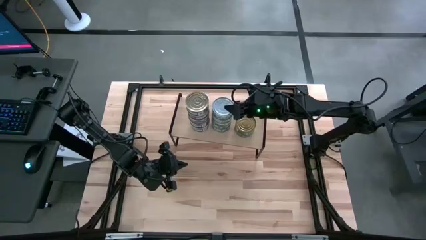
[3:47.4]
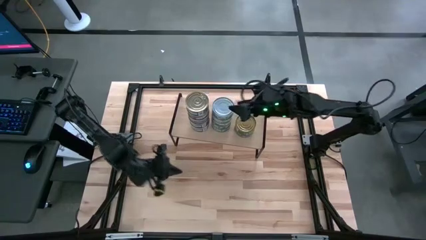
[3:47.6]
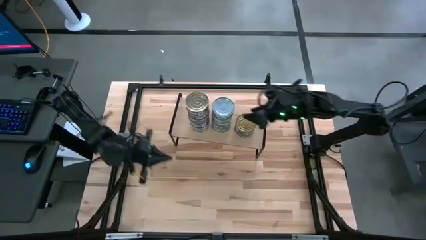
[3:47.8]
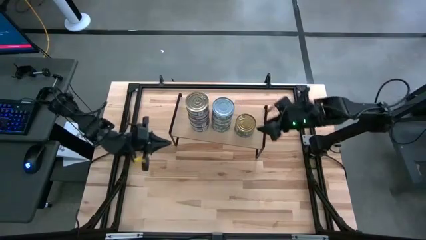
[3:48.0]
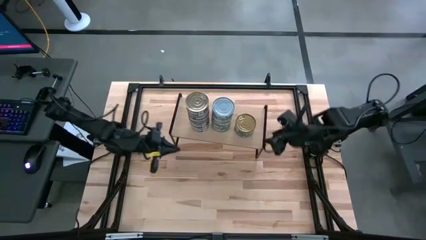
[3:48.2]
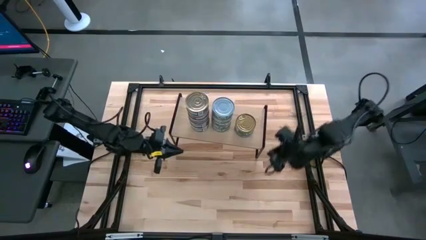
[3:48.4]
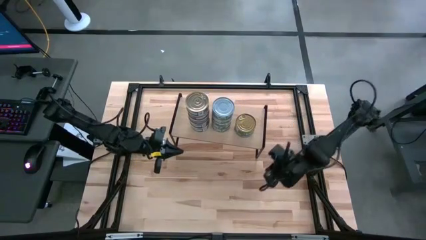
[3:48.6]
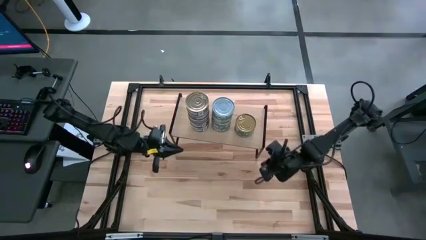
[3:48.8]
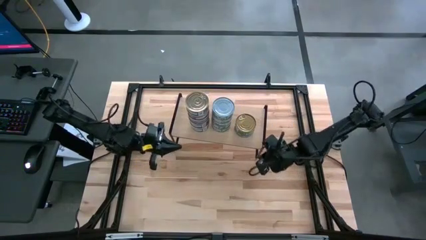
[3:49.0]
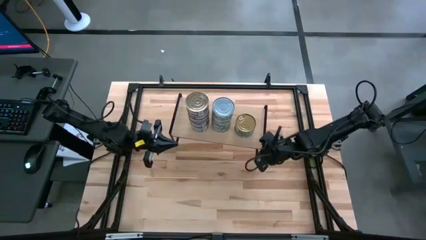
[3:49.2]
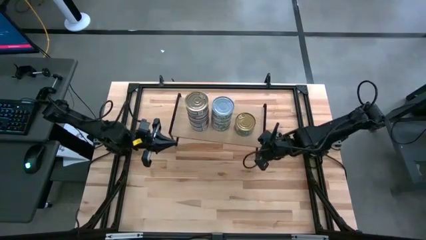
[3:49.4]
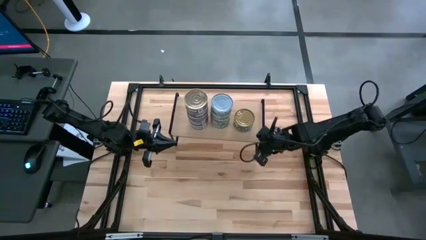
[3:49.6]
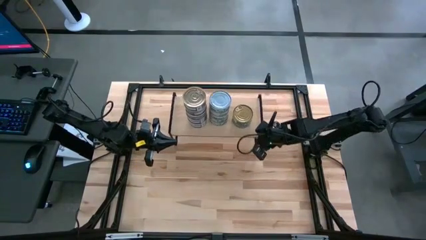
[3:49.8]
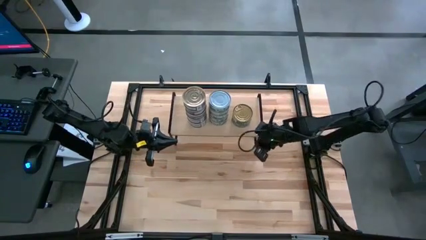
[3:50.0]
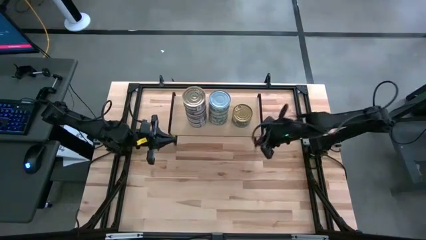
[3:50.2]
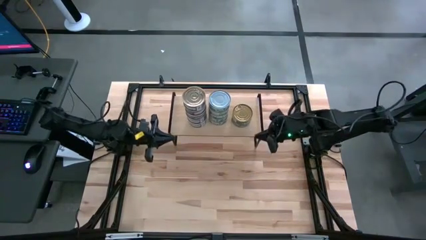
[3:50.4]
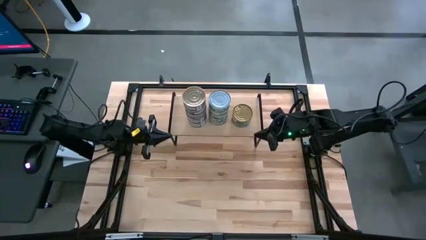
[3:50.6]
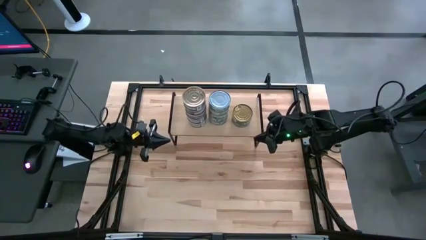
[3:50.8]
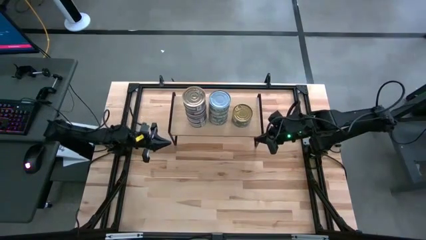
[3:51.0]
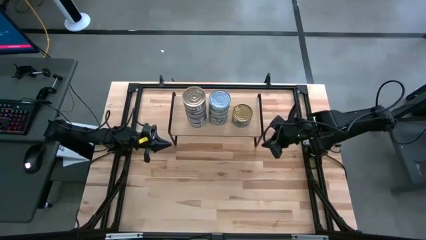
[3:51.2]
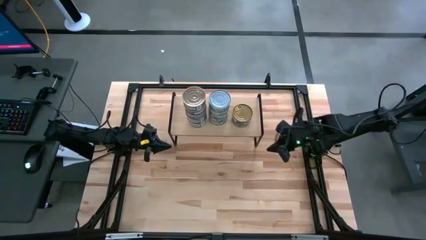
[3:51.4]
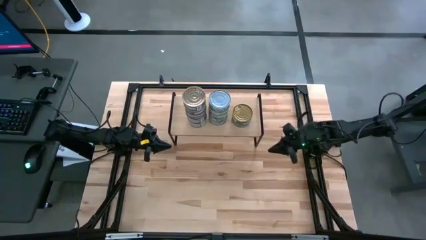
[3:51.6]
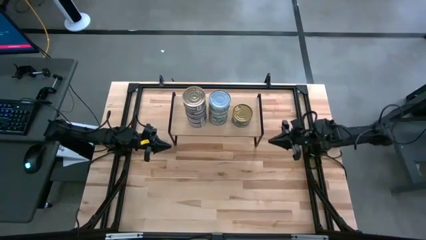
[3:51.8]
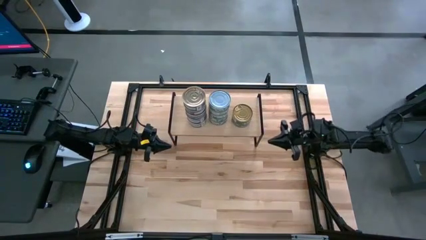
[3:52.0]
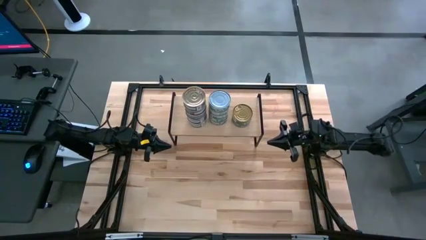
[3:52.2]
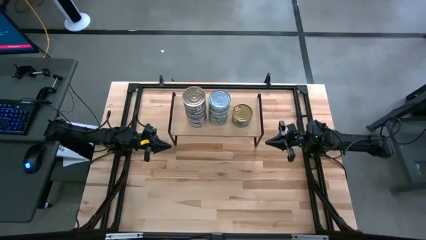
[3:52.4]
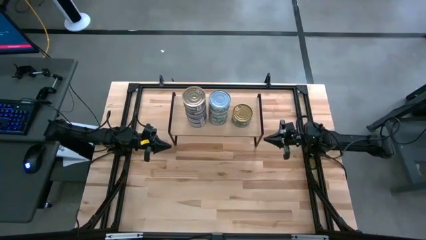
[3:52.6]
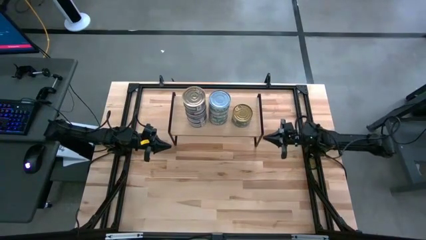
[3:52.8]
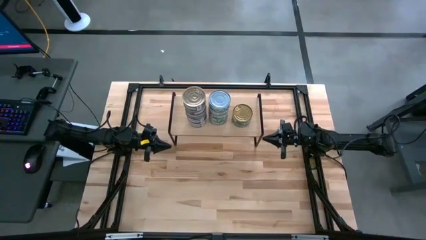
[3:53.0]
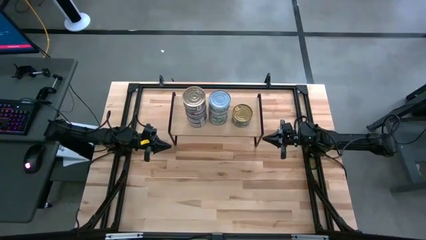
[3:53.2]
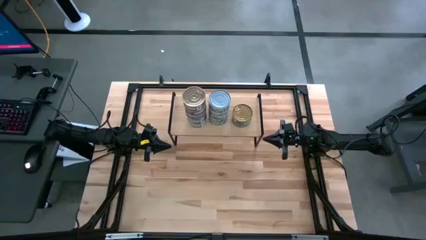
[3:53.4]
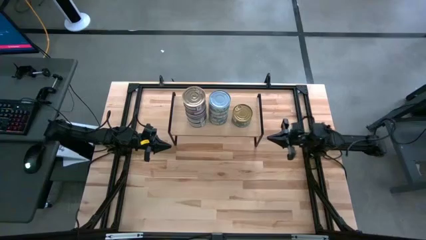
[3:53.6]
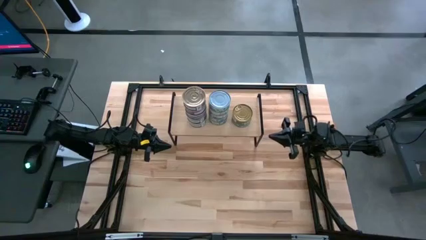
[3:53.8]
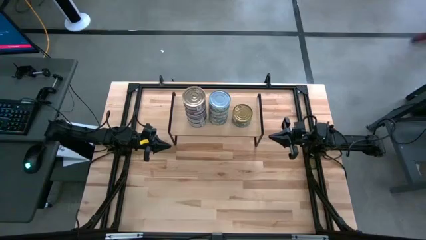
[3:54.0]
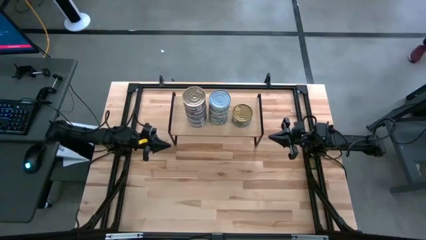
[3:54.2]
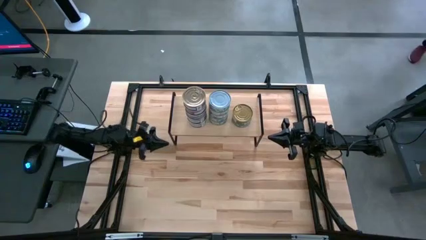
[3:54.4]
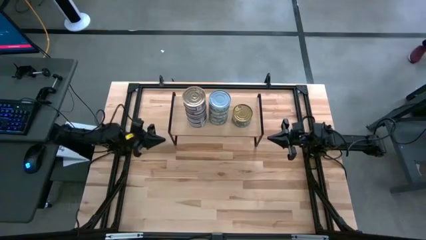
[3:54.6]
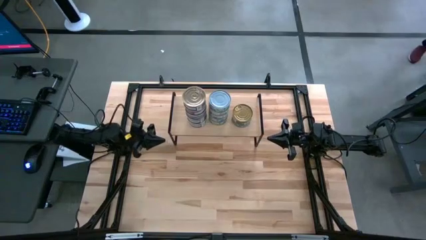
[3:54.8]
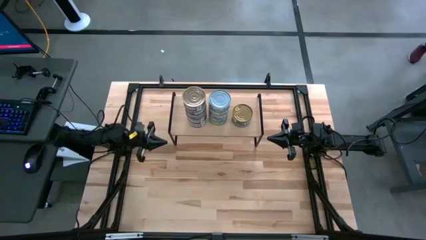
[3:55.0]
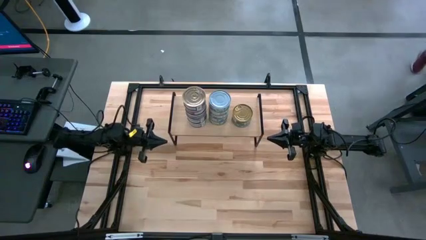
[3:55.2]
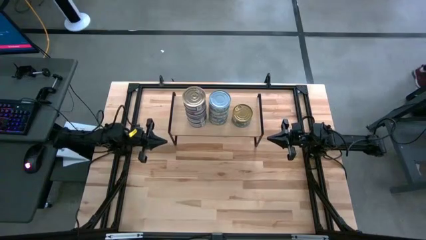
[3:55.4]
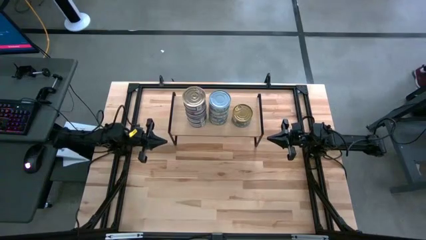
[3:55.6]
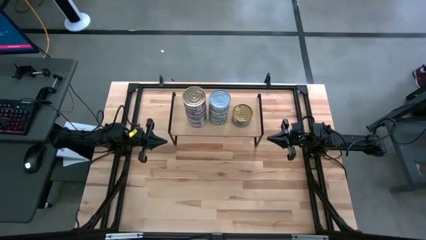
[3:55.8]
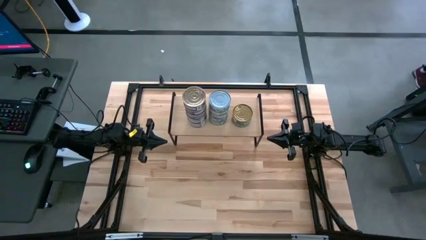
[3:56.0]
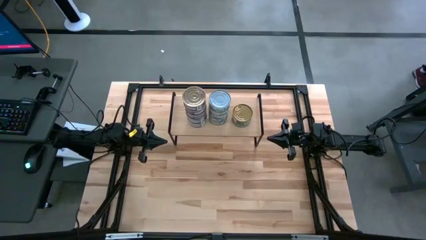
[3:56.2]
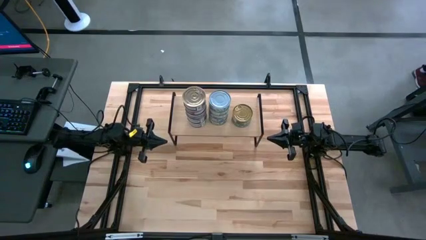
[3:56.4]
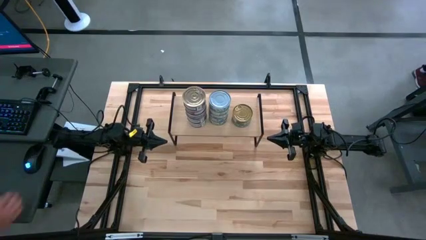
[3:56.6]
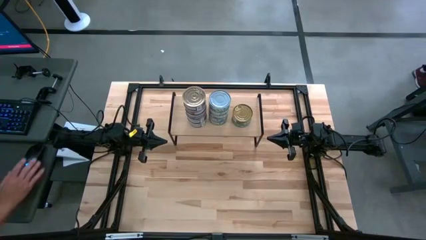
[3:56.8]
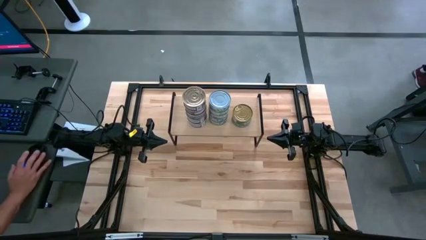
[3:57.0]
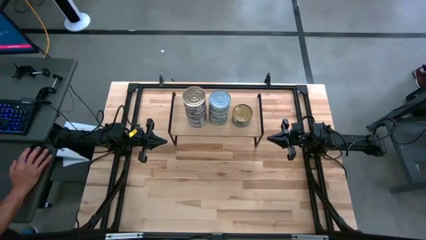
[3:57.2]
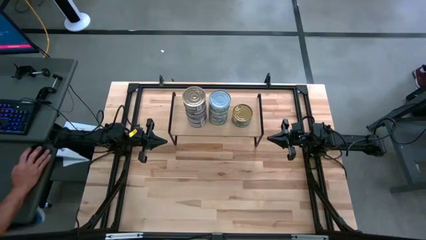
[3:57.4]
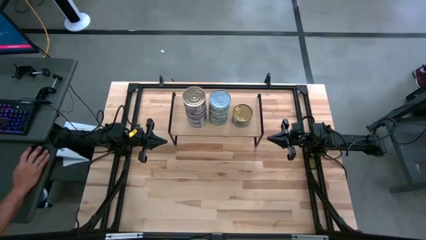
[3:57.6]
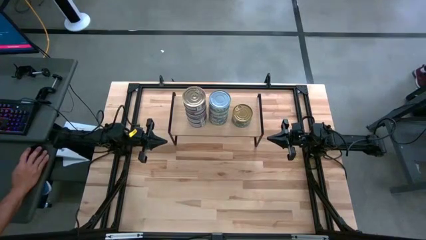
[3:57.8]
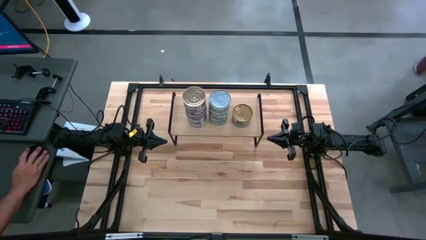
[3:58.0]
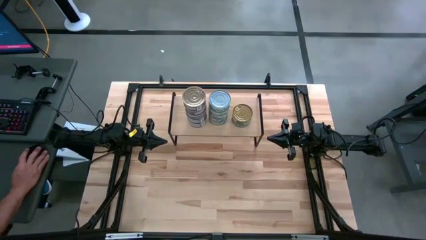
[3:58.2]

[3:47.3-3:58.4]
Task: Stack canned seafood by type on shelf
Return to Home Position

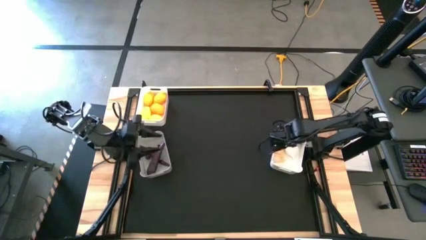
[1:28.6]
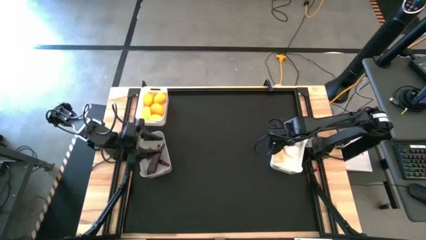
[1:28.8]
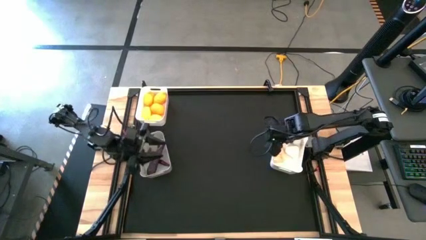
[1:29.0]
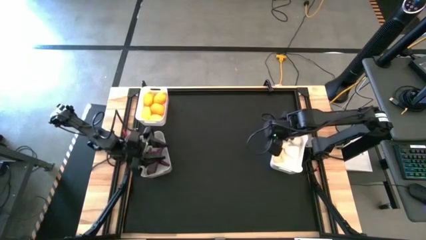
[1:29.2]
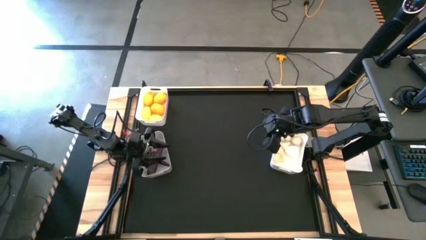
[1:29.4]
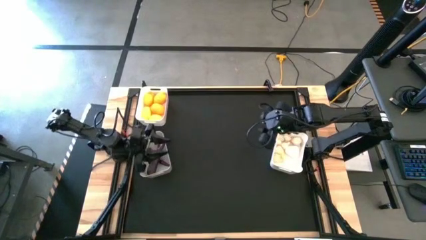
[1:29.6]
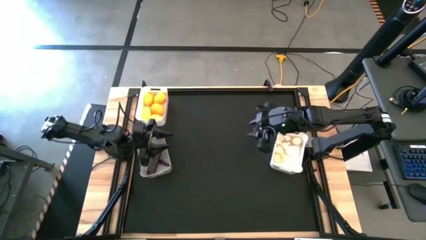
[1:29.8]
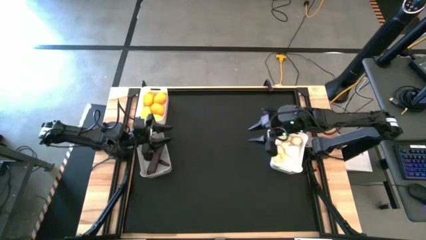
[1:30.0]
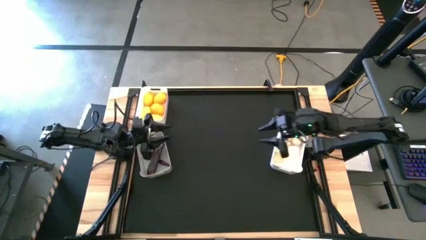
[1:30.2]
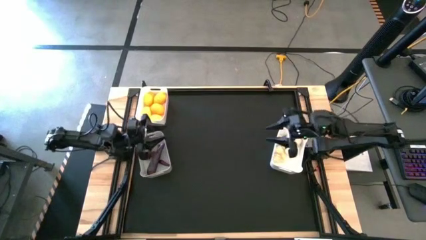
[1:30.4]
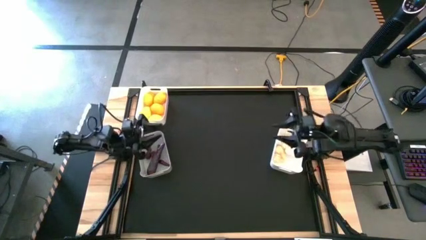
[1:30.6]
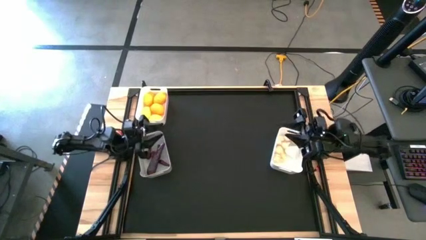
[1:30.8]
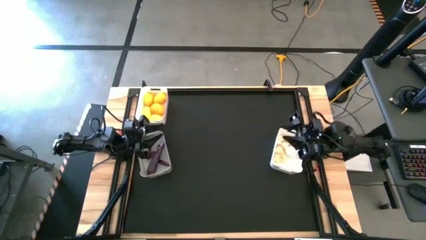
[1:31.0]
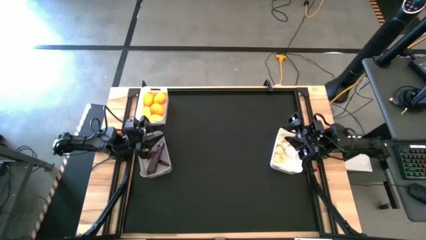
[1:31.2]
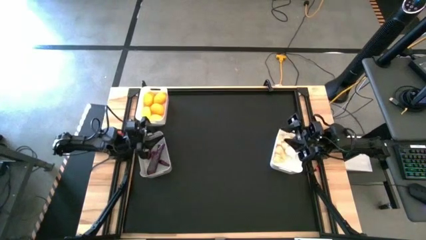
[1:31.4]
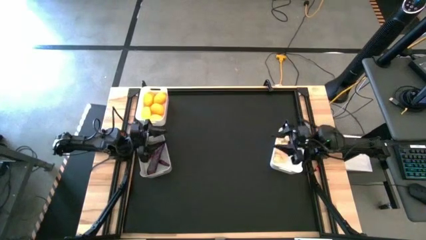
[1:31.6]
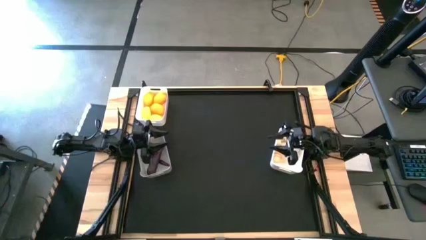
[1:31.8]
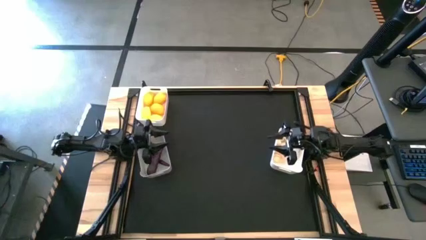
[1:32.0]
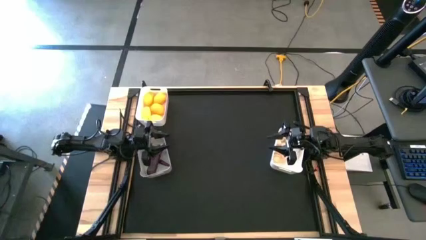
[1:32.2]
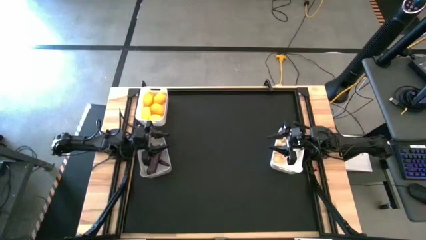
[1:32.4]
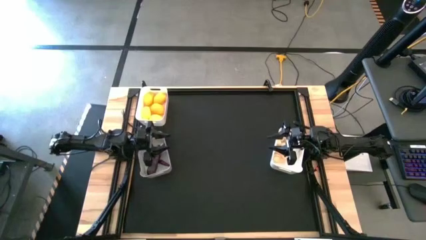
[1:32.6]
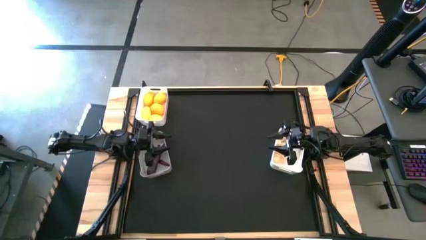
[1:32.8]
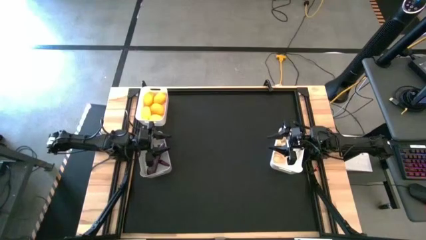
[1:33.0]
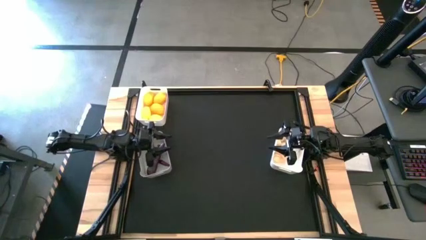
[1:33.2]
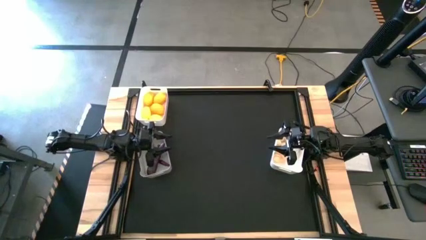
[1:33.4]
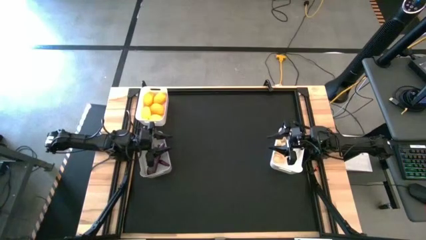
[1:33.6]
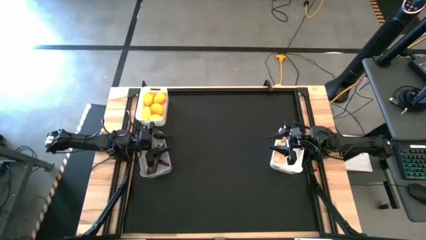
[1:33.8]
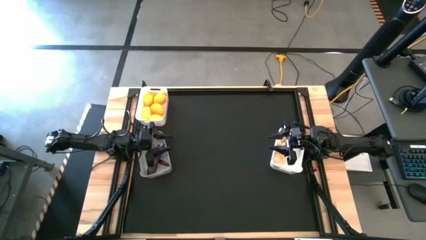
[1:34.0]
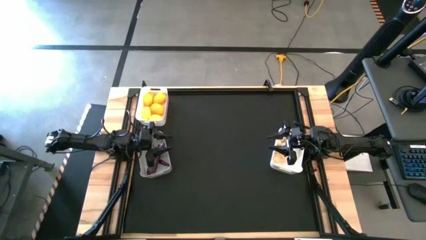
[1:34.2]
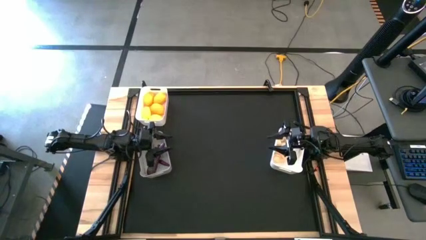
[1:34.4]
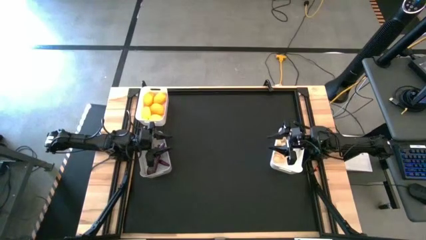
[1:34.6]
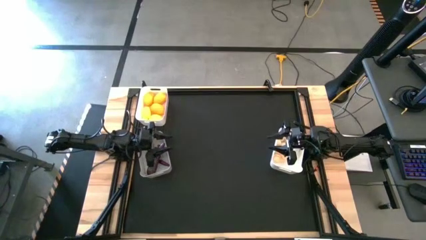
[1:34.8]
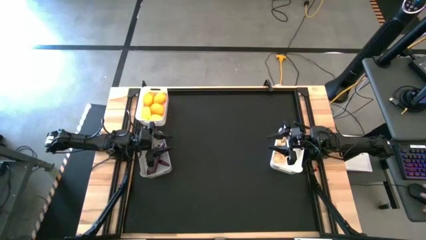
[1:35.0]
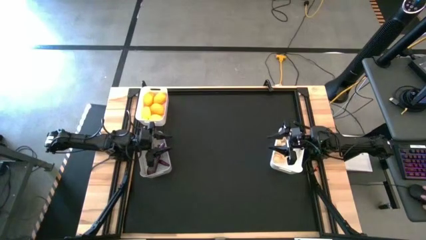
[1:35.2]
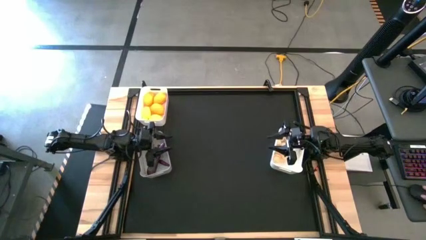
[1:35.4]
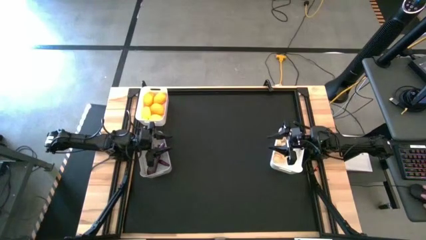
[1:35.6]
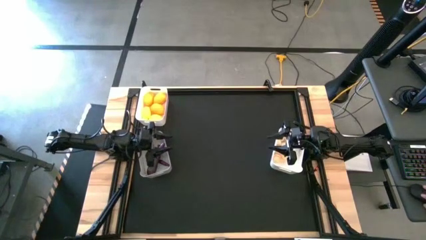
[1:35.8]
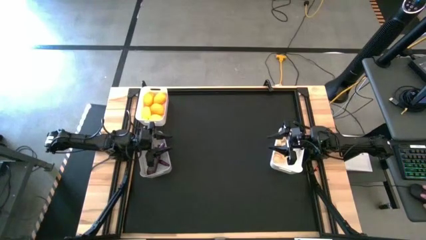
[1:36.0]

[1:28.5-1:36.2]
Task: Sort produce into baskets
Return to Home Position
